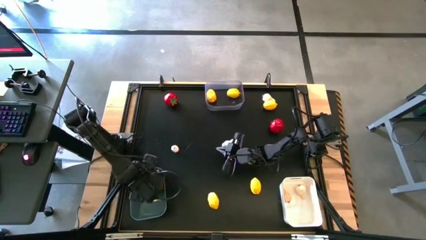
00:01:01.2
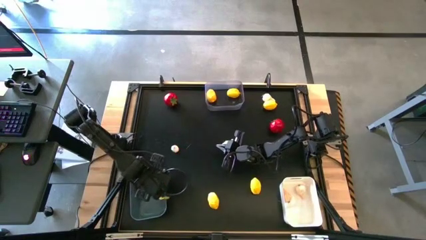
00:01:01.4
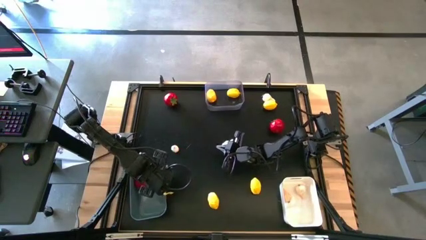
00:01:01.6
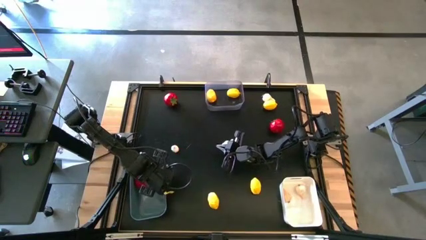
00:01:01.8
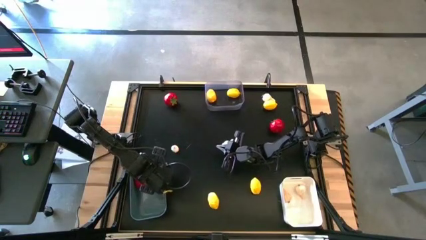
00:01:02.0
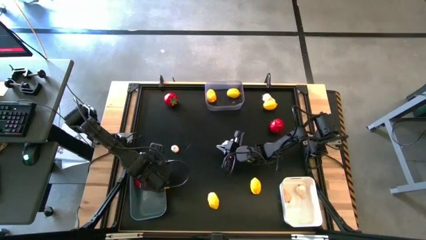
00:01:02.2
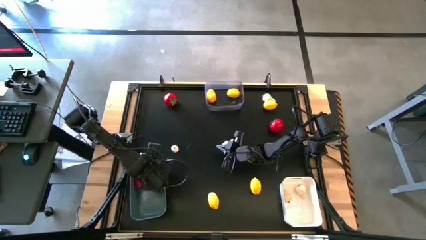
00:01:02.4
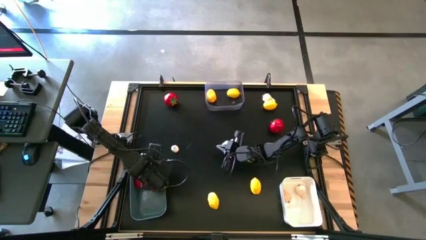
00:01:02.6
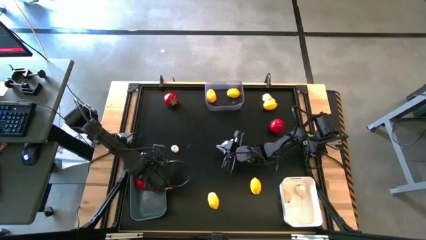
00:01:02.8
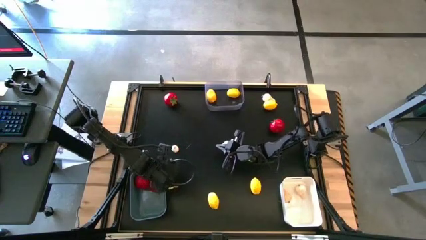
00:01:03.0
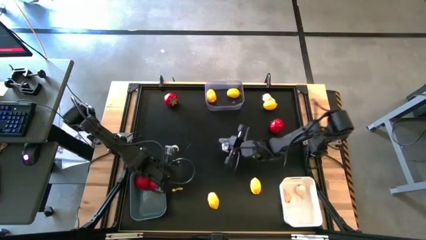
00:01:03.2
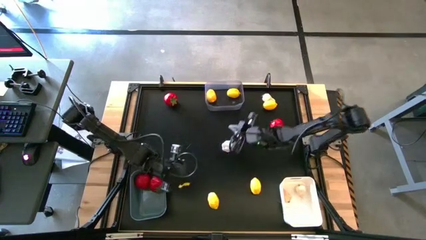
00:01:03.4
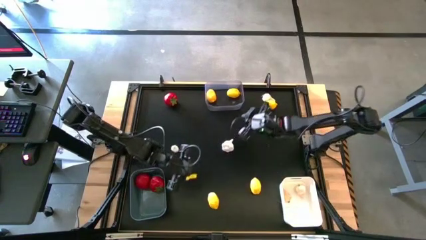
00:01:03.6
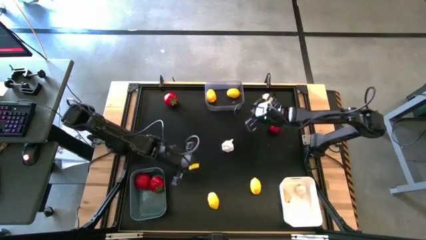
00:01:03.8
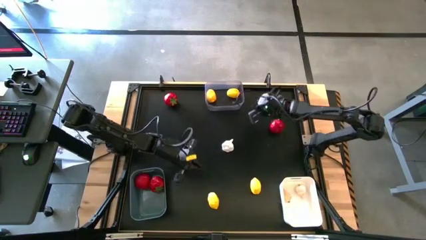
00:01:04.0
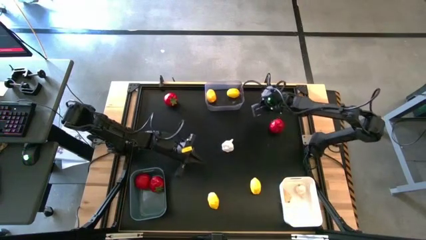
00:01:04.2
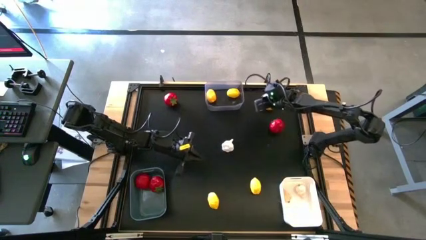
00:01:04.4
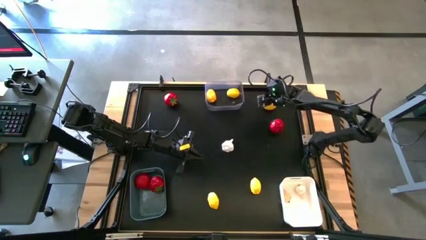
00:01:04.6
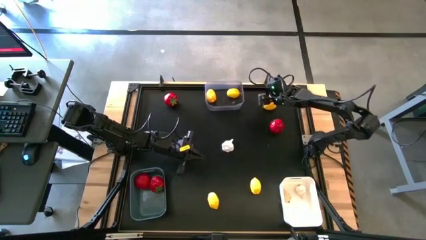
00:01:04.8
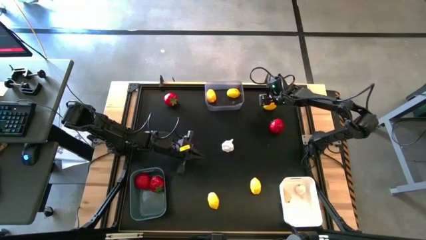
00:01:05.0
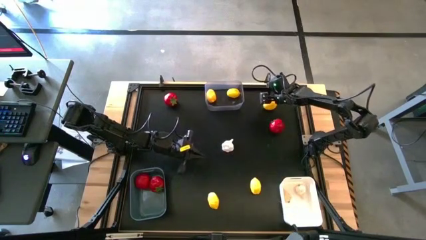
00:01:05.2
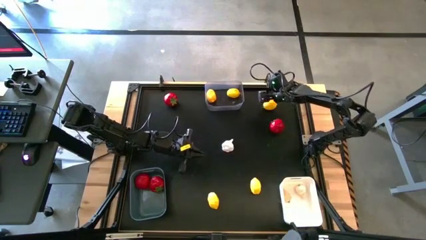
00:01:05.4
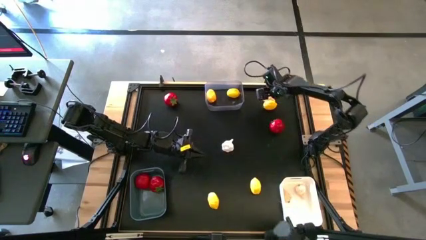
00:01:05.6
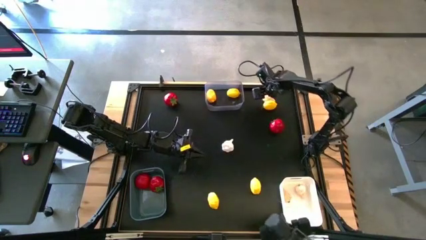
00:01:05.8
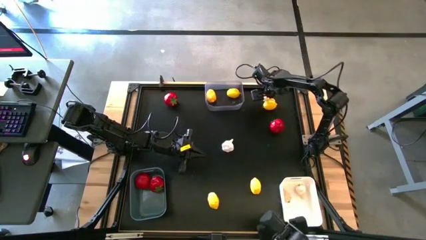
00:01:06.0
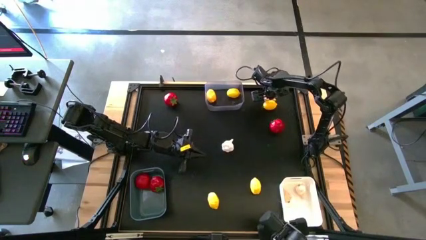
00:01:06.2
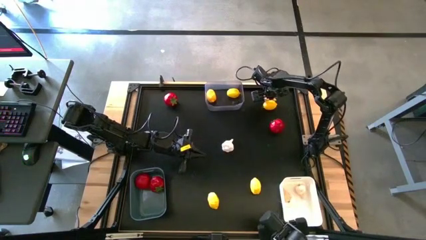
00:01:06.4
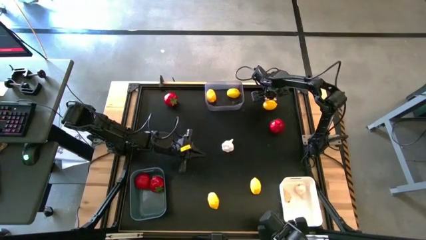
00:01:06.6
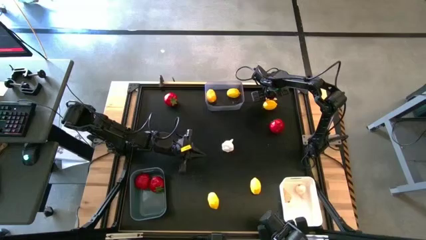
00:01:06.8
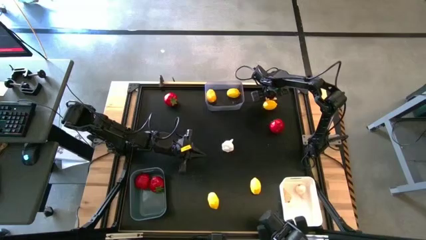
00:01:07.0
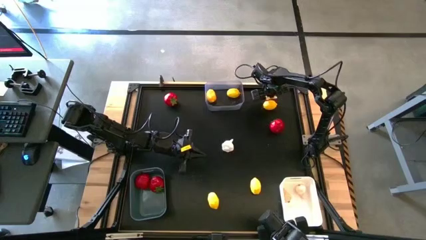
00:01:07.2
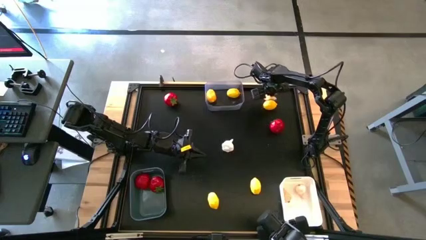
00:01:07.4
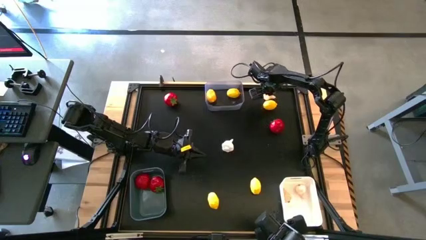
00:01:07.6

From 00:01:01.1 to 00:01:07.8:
Task: Sort produce into baskets
Put the top garlic into the white bin

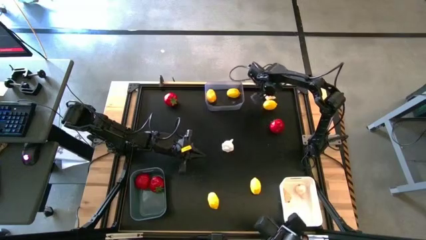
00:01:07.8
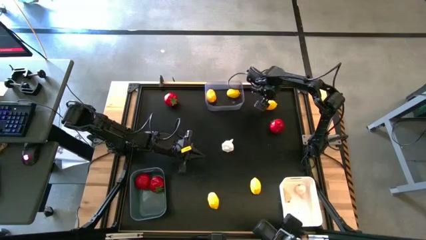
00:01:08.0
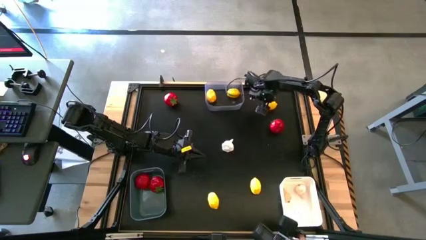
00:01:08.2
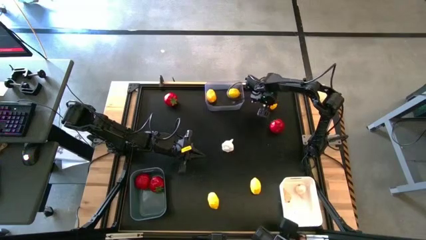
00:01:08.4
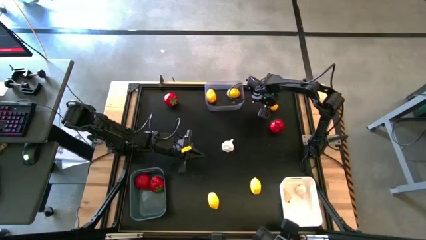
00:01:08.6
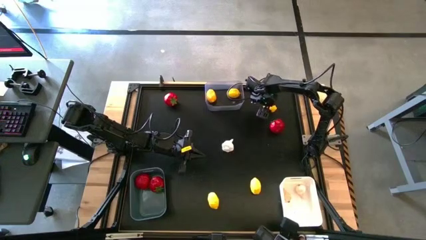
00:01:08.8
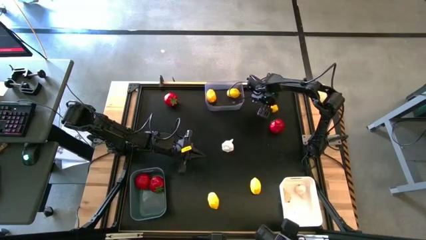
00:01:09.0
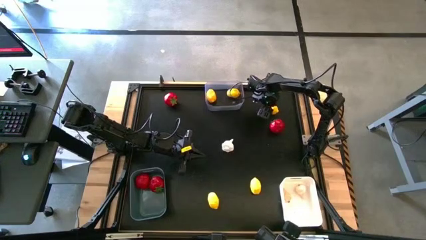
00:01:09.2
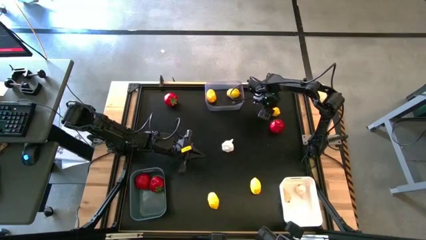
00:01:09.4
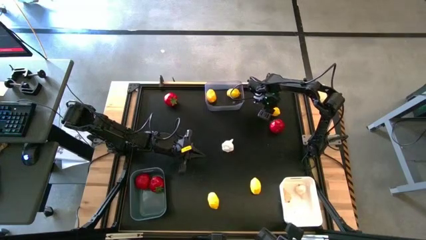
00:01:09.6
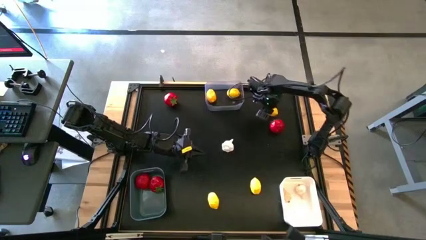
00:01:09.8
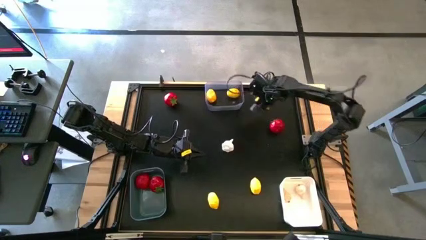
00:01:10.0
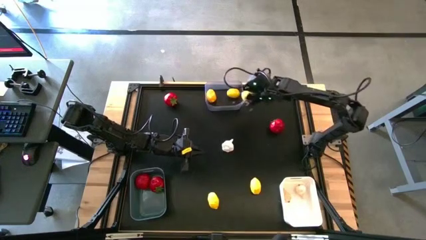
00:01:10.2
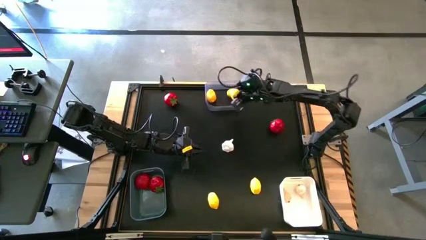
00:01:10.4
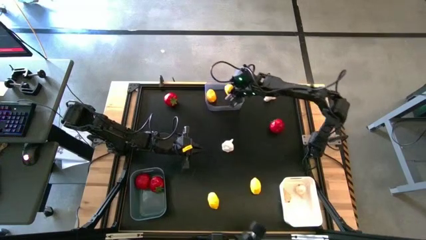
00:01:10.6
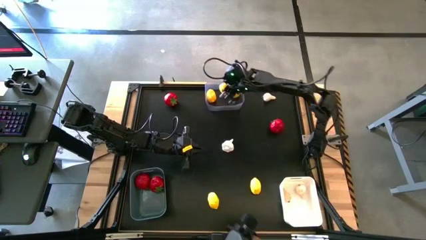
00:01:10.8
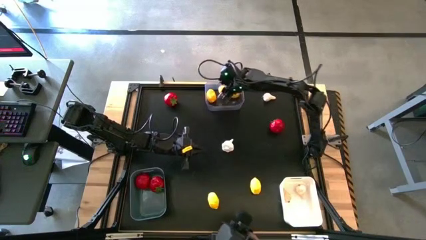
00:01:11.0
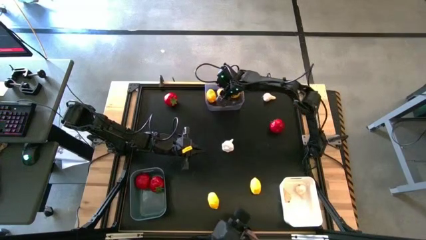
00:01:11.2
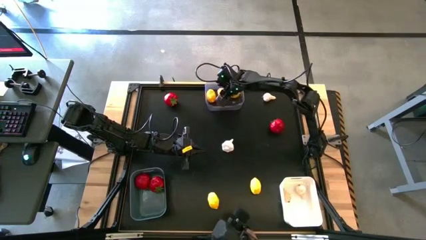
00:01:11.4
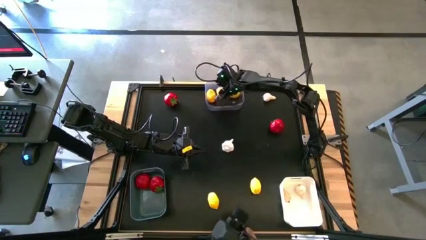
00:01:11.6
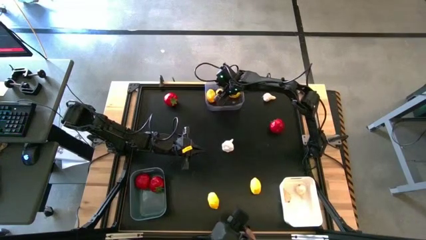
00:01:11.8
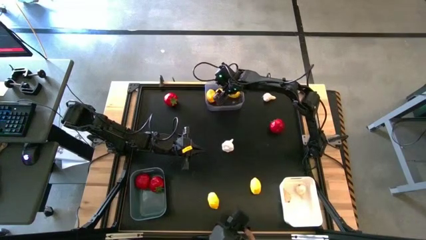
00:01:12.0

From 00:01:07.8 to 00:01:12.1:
Put the top lemon into the transparent bin

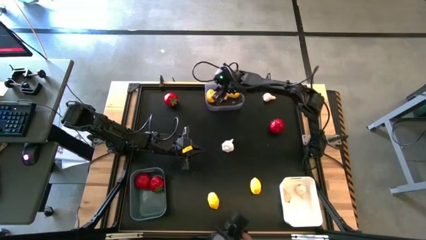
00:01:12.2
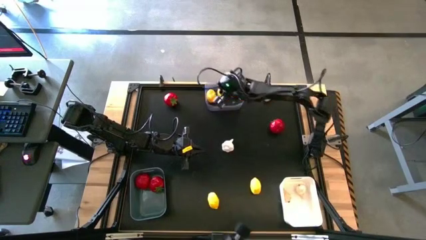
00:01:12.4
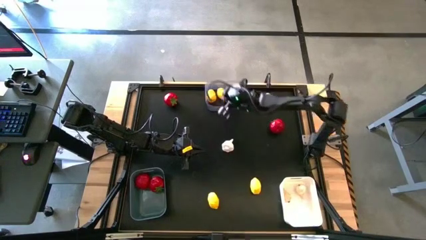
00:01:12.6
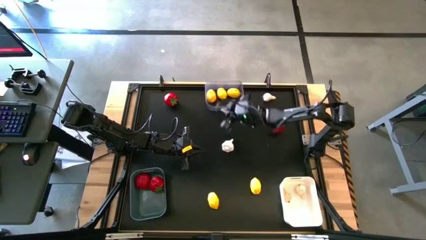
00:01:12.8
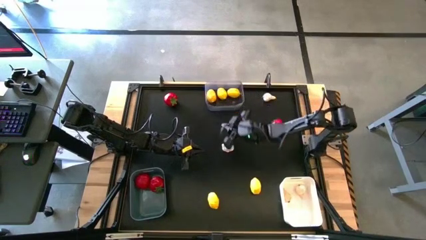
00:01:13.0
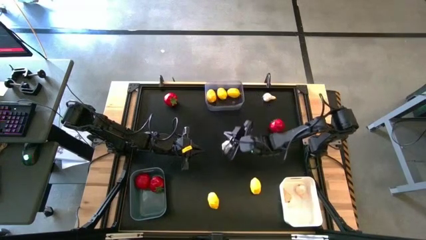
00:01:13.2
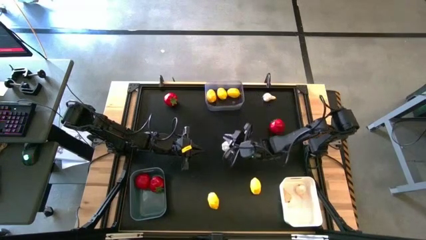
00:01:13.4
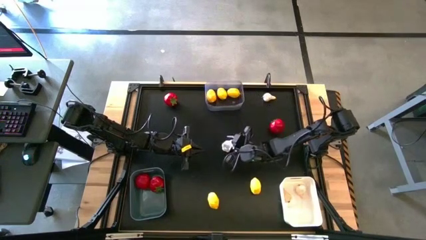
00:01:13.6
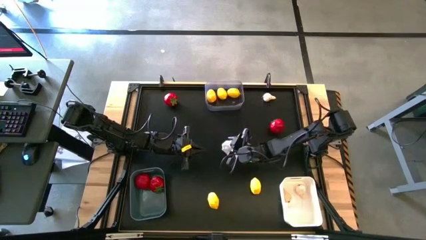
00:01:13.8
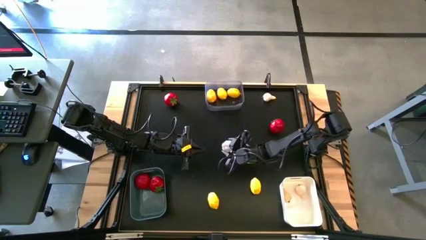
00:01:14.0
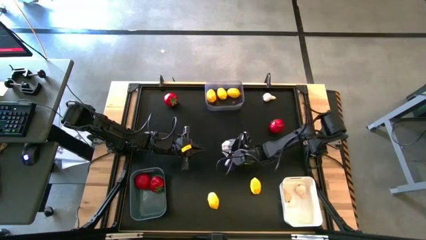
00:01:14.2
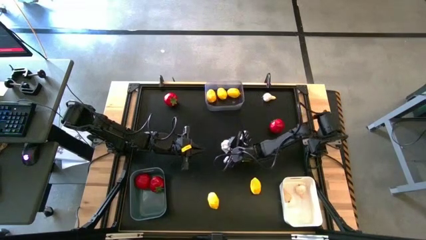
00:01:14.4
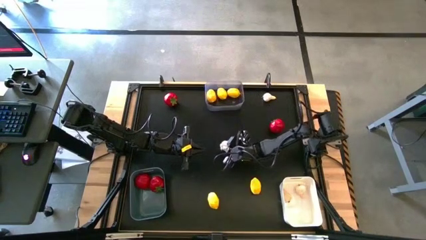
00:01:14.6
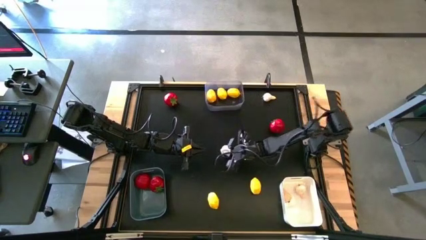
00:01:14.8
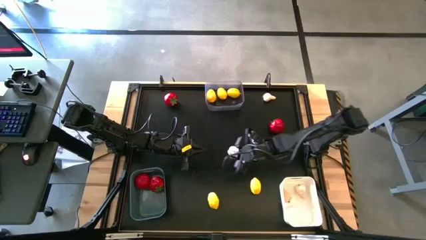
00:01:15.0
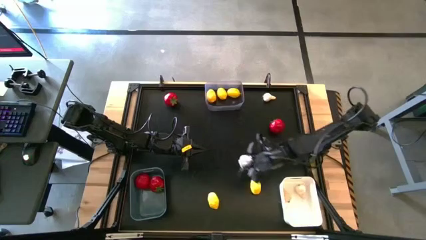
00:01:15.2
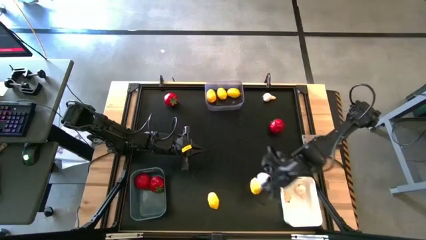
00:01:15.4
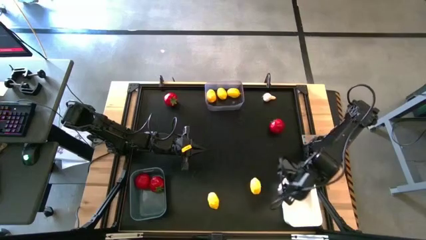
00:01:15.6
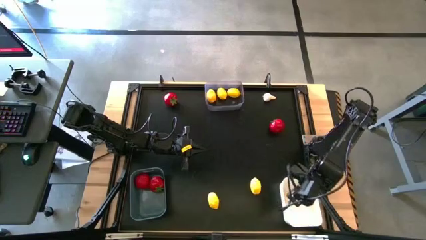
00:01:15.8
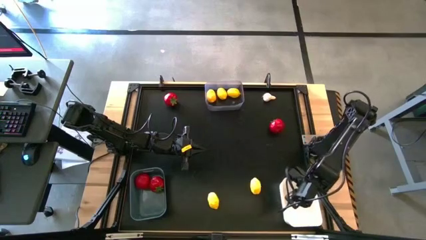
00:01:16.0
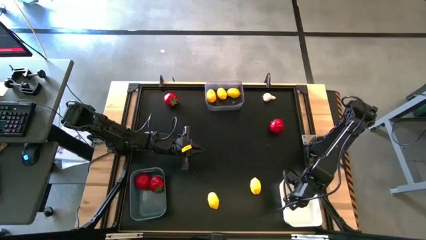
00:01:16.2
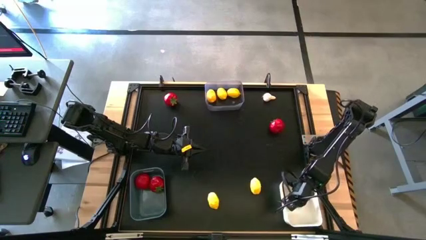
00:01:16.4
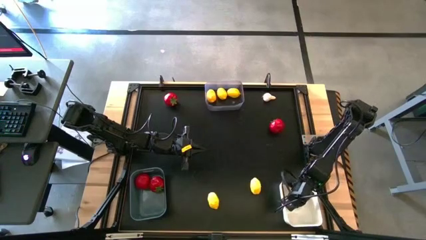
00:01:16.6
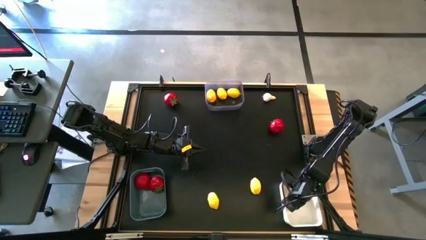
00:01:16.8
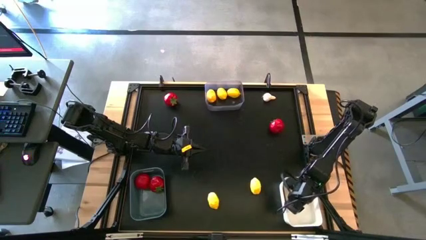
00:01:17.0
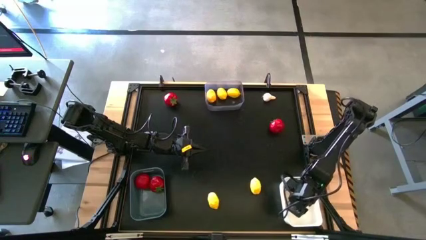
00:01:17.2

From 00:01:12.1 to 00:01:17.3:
Put the center garlic into the white bin
